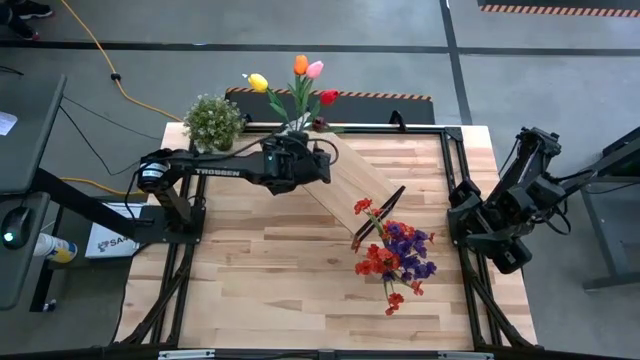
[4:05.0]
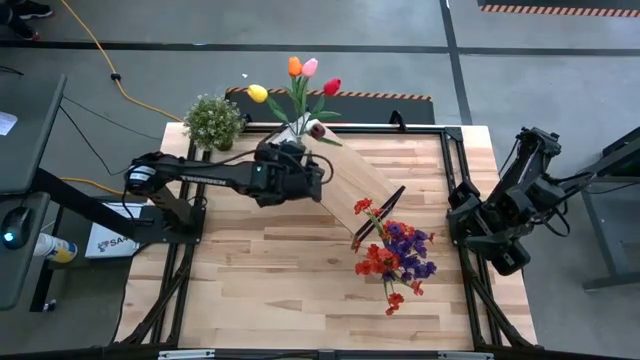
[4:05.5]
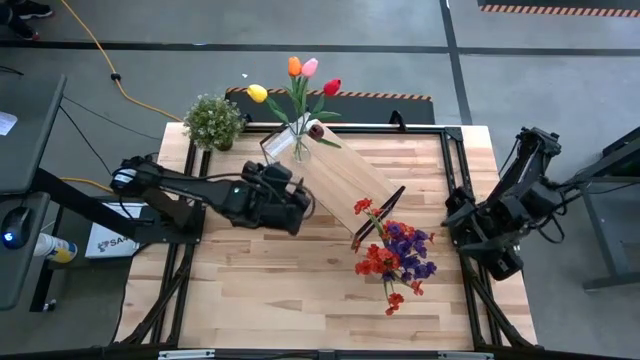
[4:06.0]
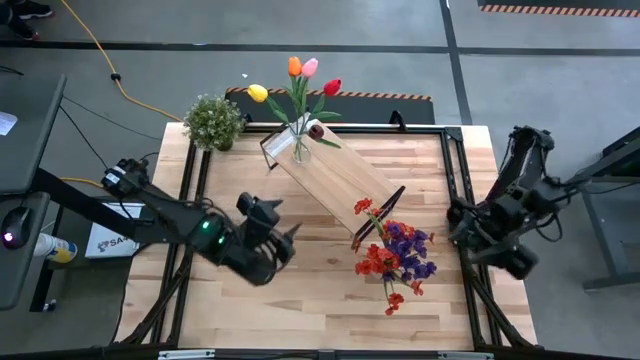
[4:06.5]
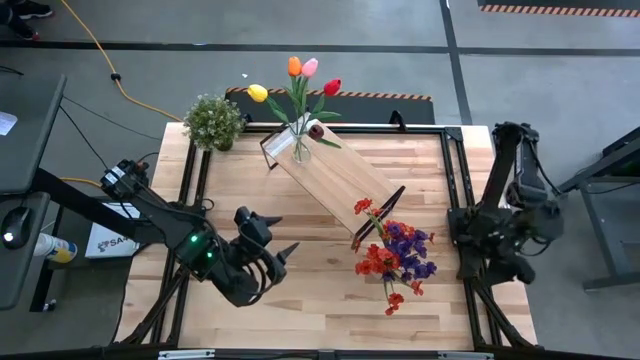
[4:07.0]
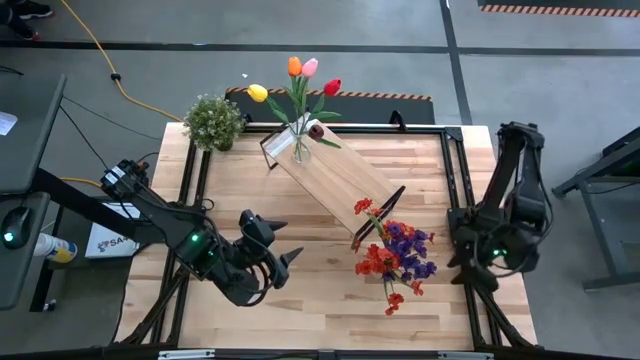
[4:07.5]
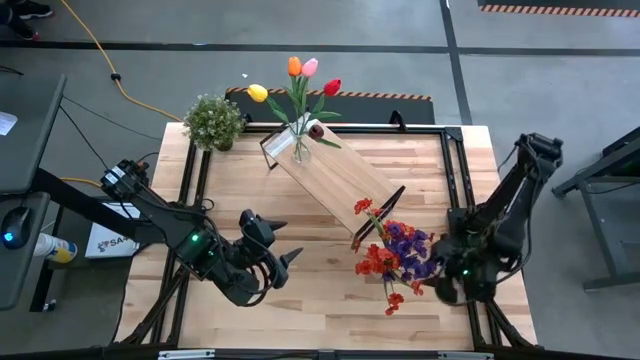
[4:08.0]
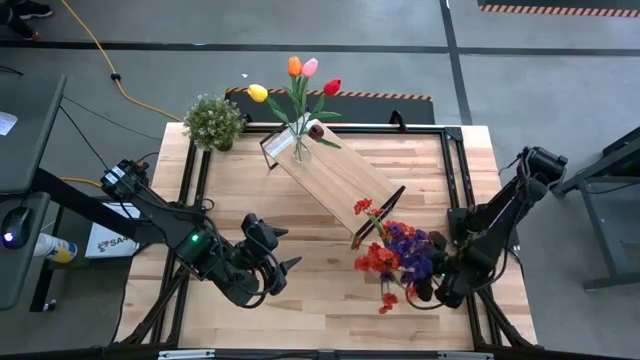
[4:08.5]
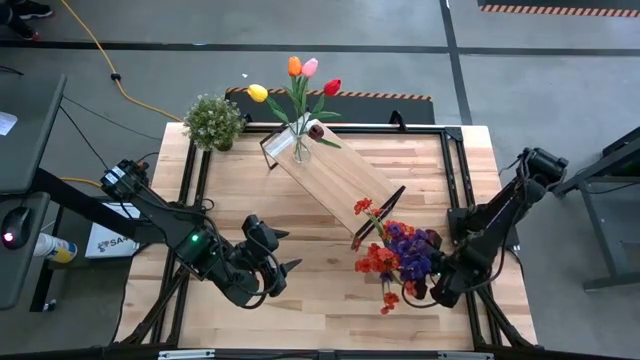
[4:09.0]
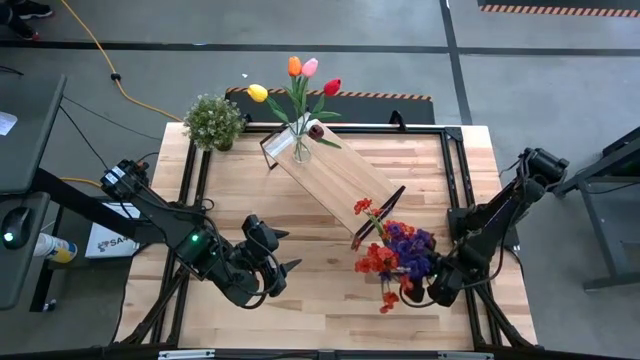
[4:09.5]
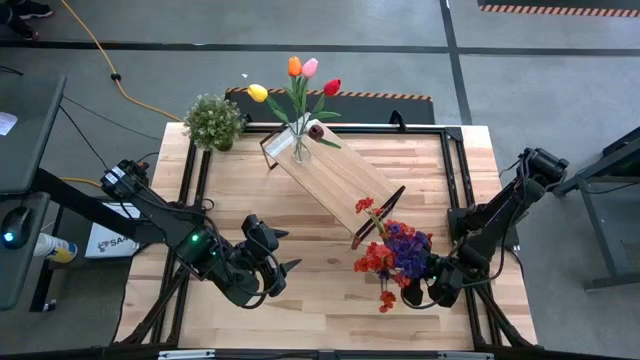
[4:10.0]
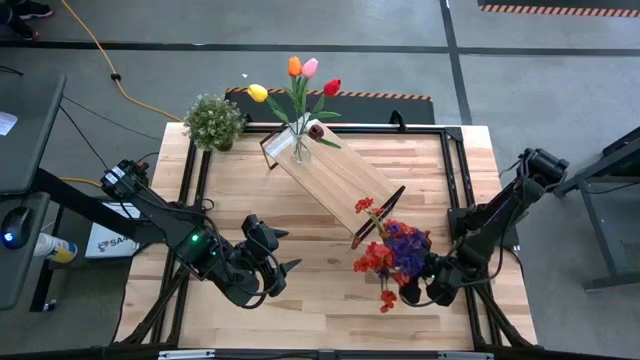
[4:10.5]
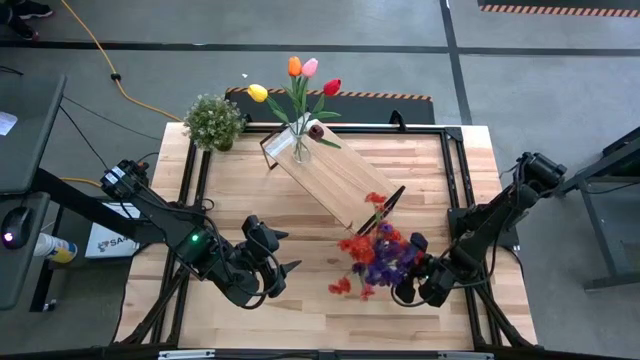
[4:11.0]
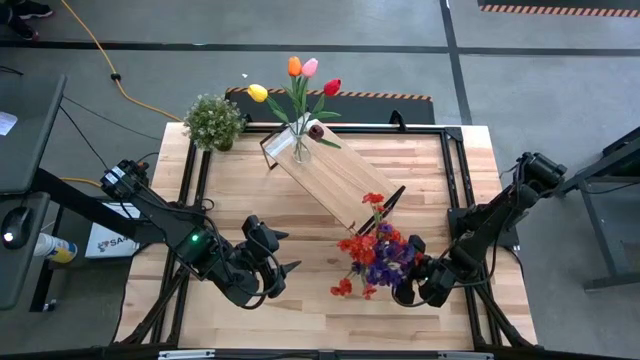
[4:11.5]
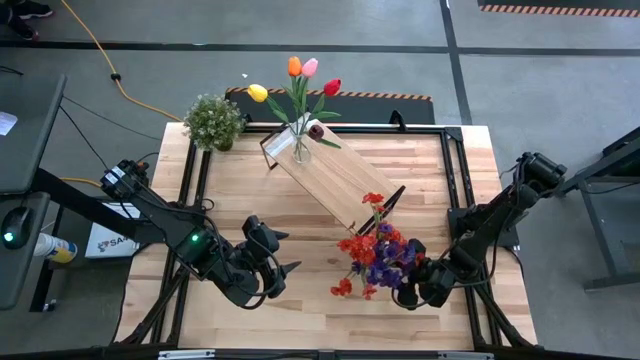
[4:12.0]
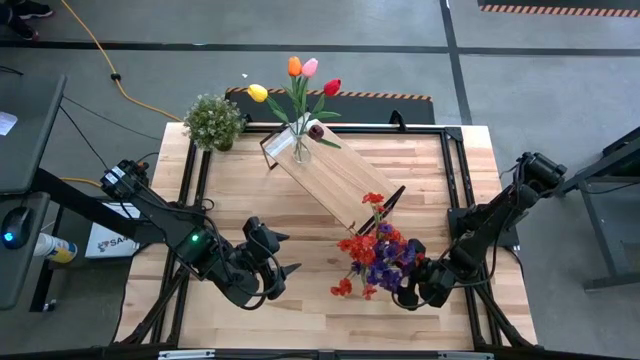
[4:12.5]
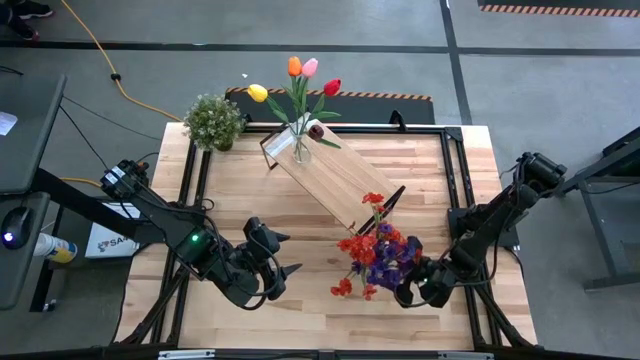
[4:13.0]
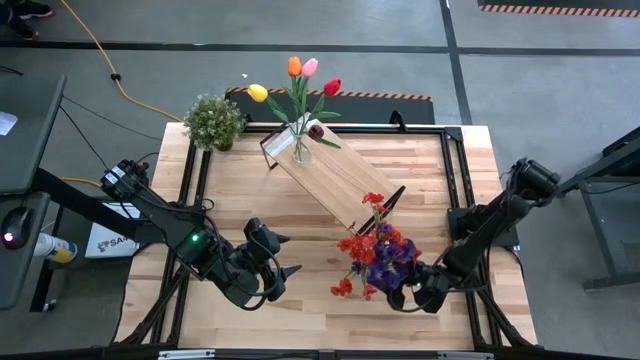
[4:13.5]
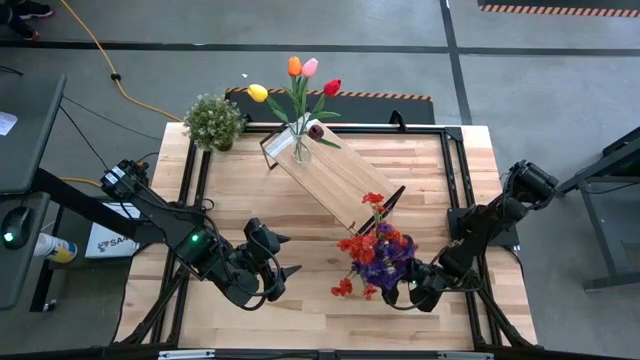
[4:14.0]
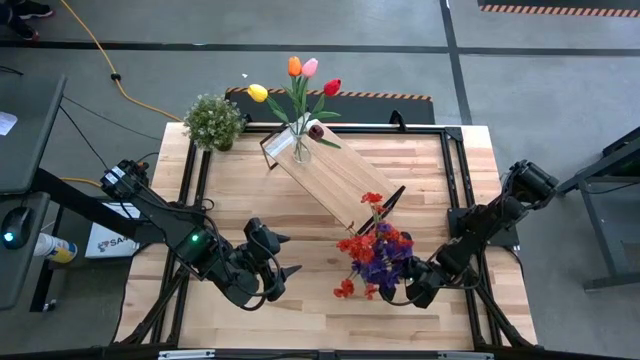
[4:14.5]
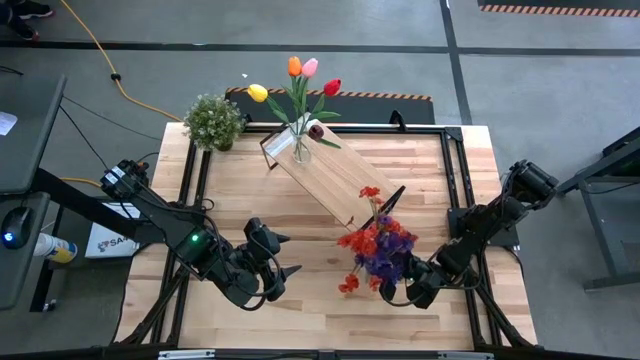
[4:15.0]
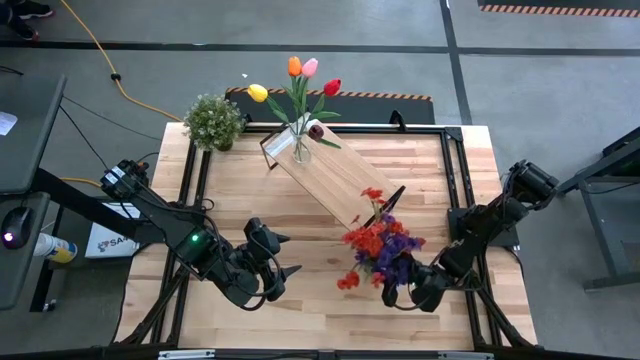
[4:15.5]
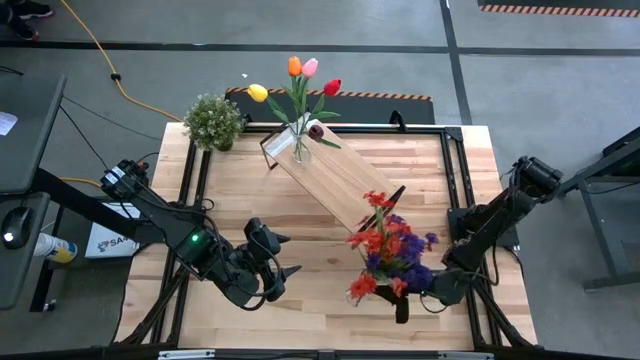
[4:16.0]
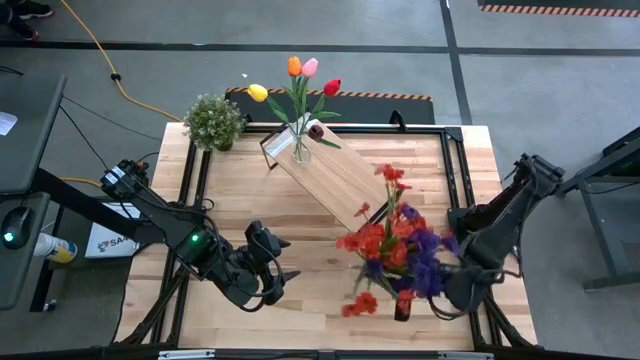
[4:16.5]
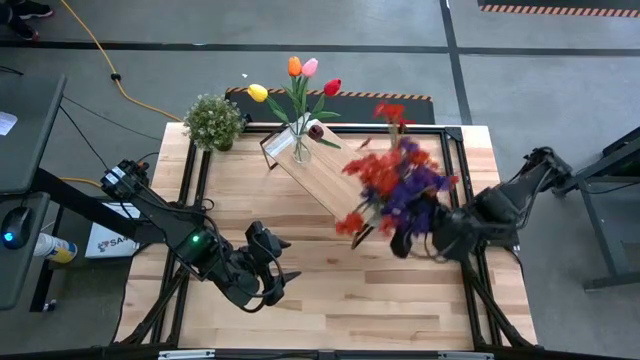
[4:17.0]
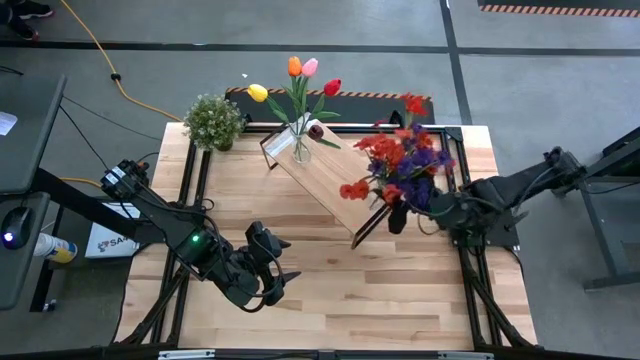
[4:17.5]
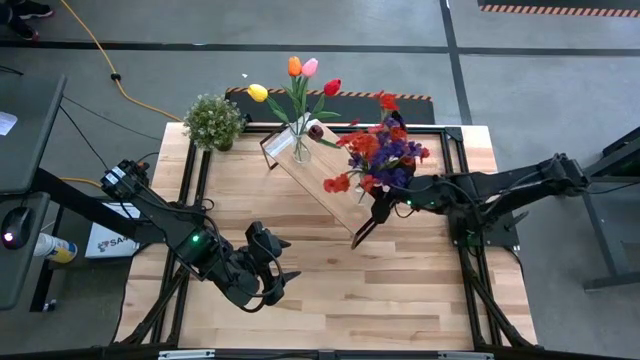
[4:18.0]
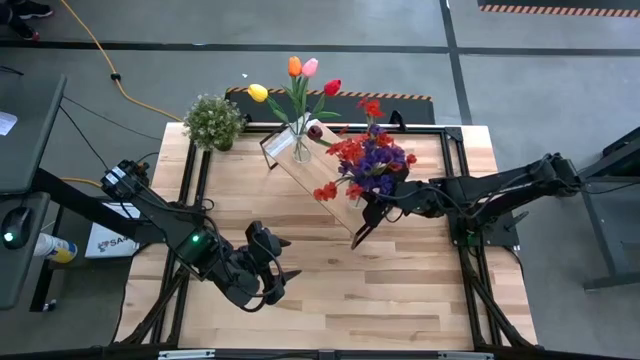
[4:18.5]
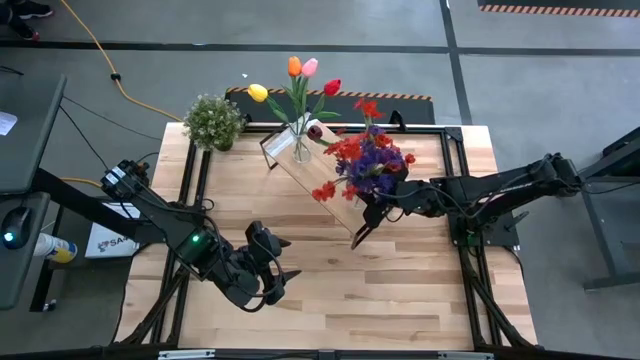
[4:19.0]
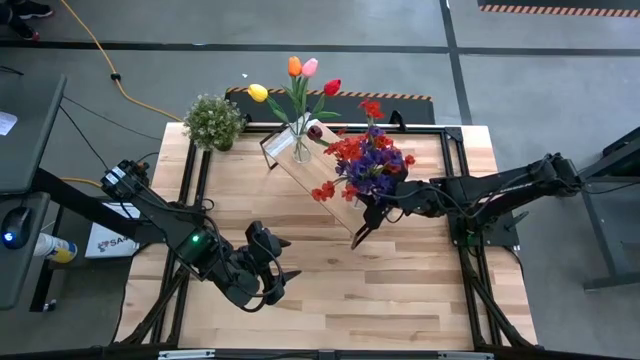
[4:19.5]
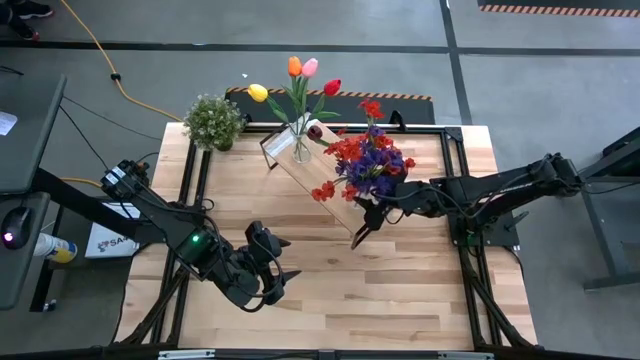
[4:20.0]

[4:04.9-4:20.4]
Task: Pick and place flowers into a vace then onto a shelf
Put the transparent flower vase on the shelf

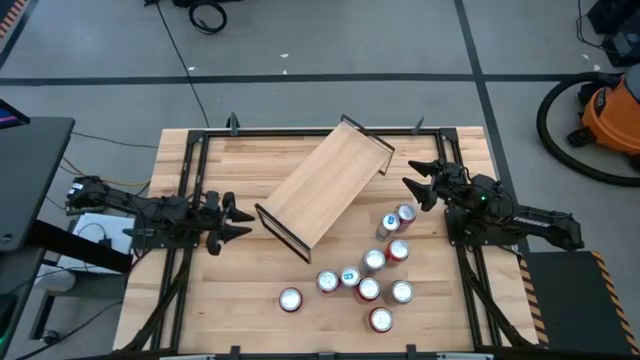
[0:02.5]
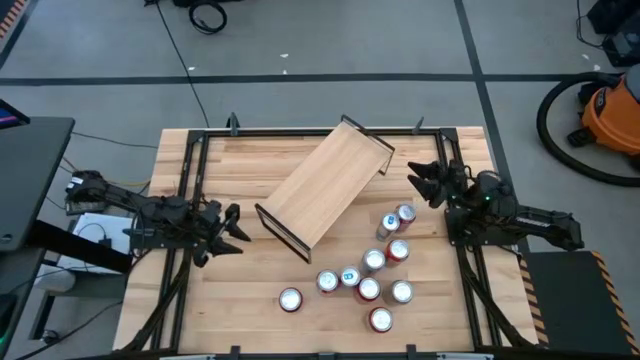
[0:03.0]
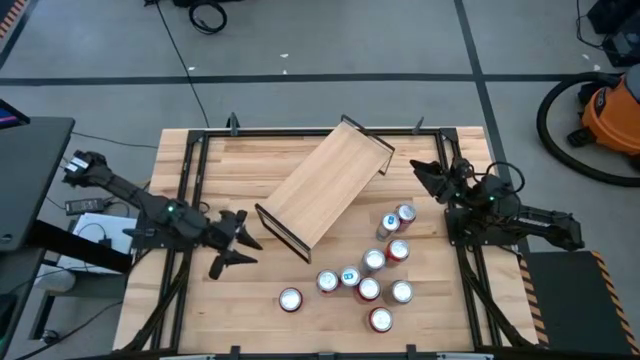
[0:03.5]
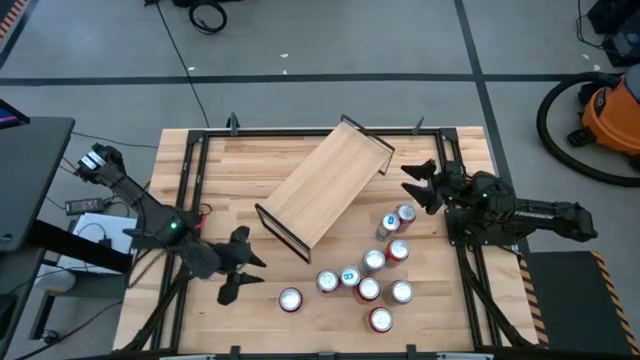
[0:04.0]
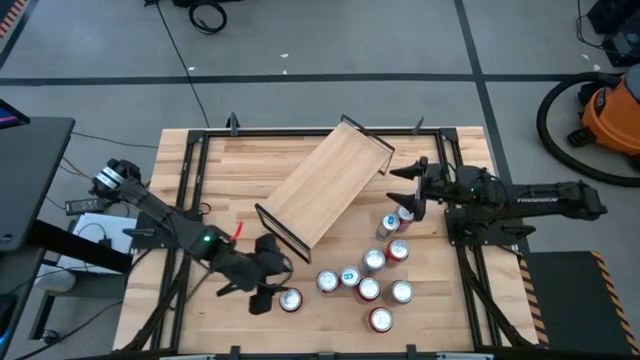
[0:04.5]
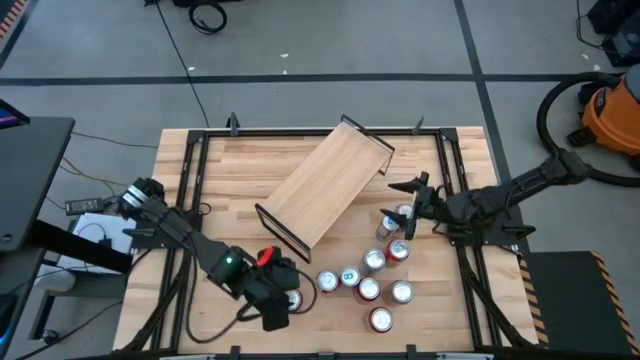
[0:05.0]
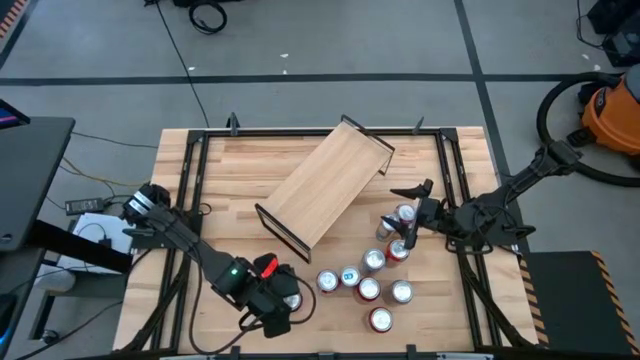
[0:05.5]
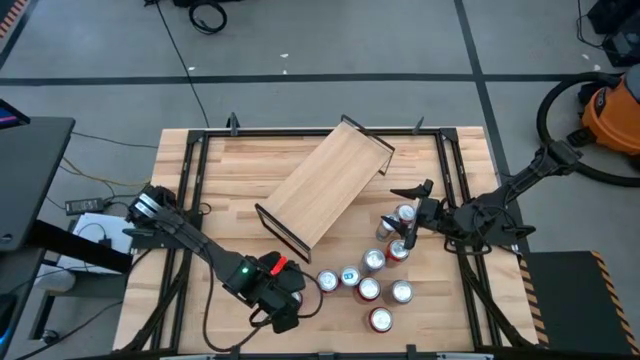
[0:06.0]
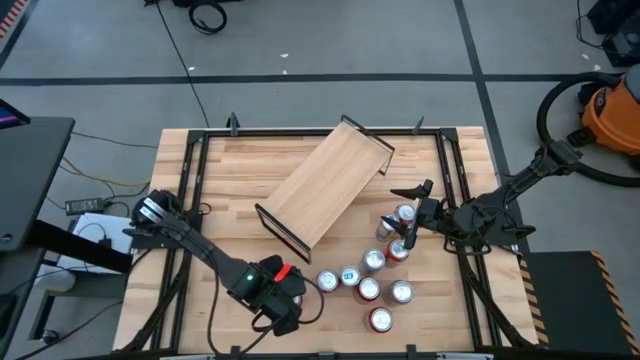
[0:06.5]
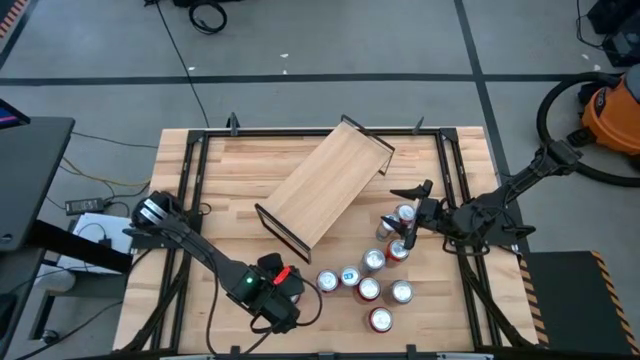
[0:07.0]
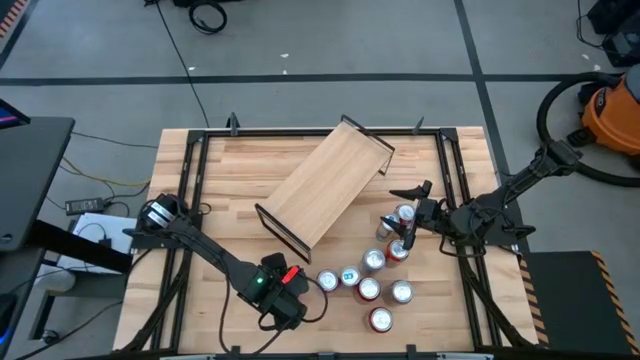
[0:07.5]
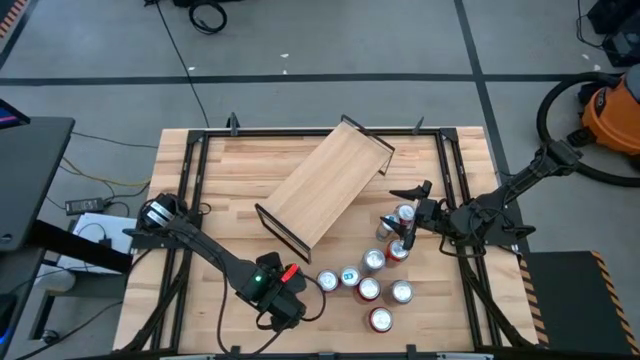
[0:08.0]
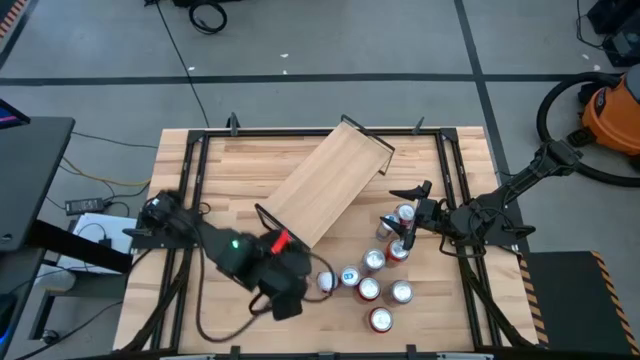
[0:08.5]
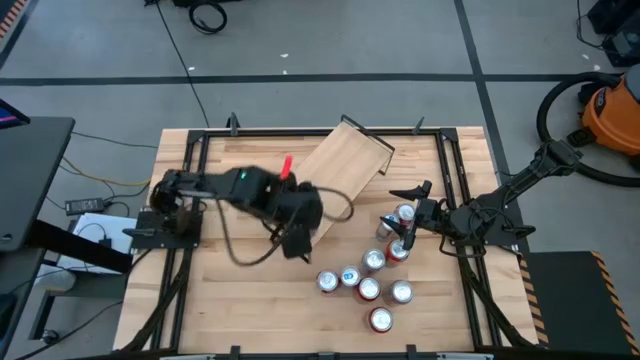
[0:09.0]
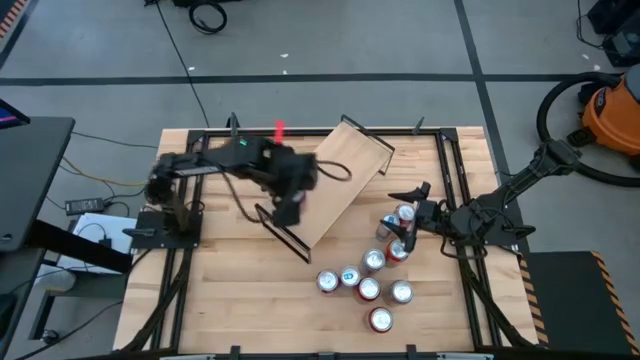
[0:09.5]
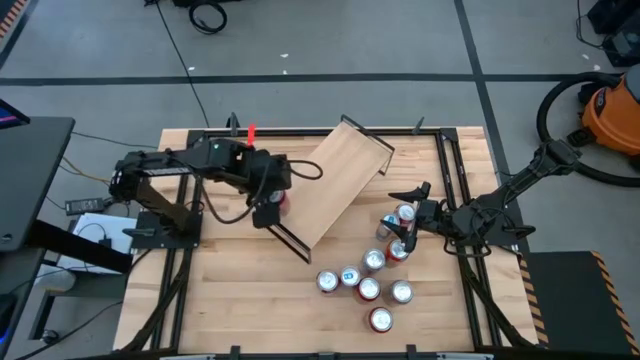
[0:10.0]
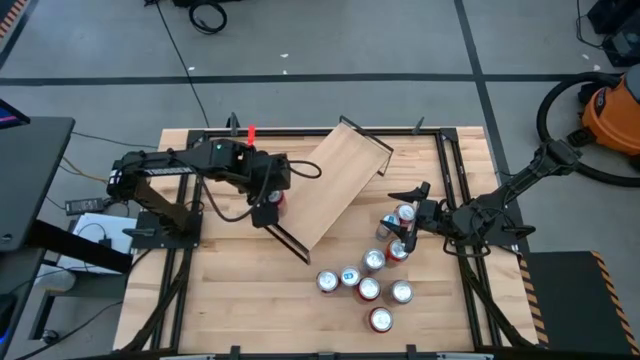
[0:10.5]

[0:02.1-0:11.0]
Task: Place canned beverage on shelf
Put the left red-black soda can on the shelf
